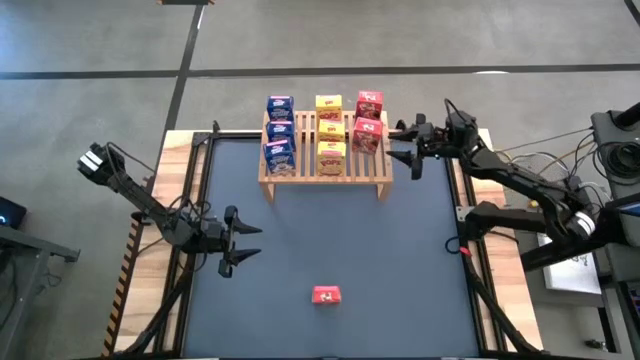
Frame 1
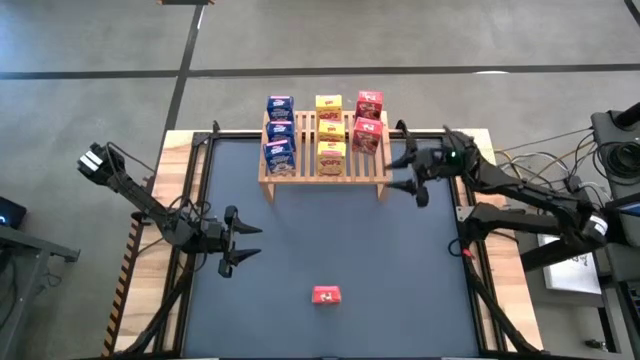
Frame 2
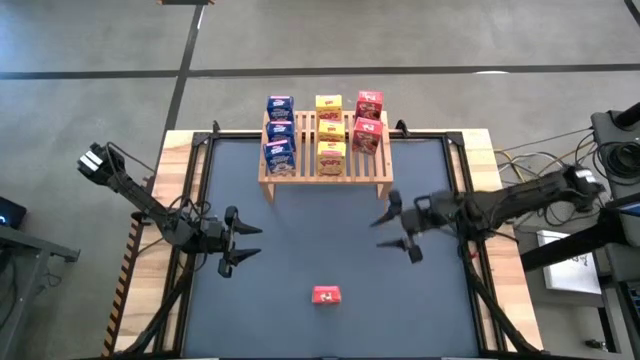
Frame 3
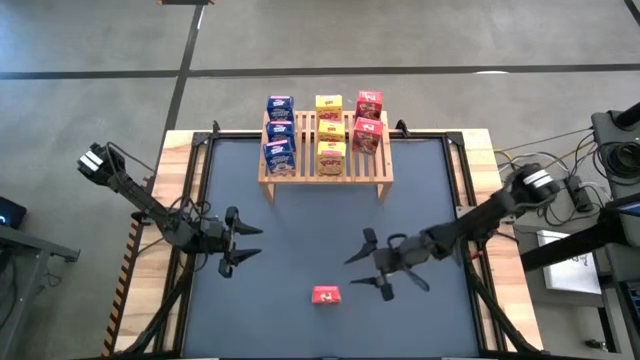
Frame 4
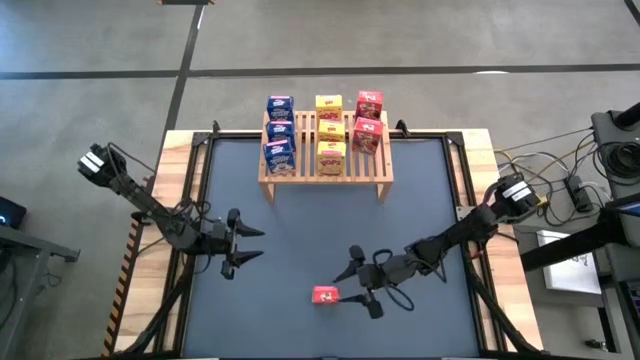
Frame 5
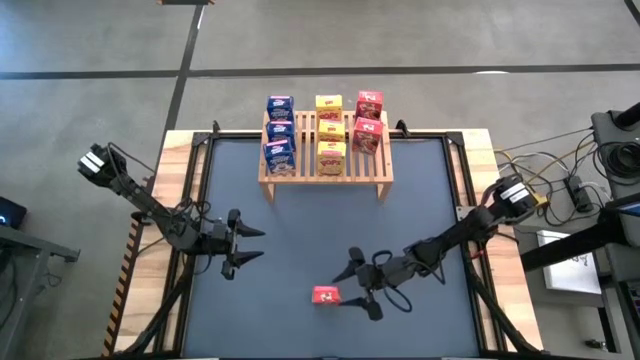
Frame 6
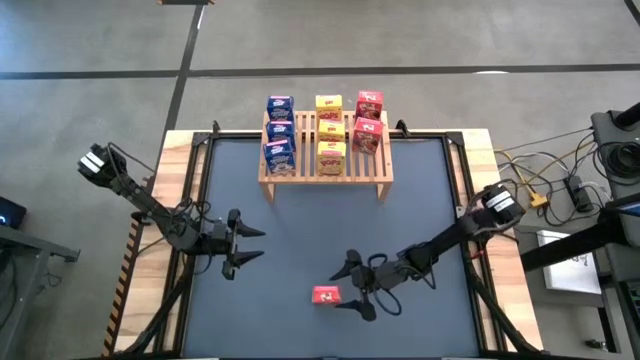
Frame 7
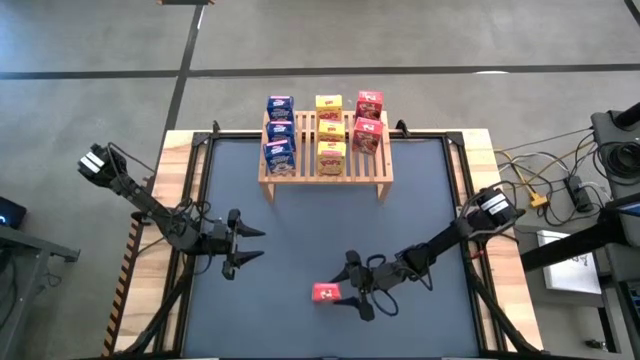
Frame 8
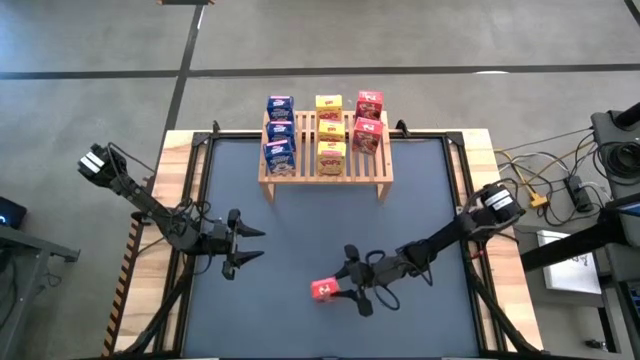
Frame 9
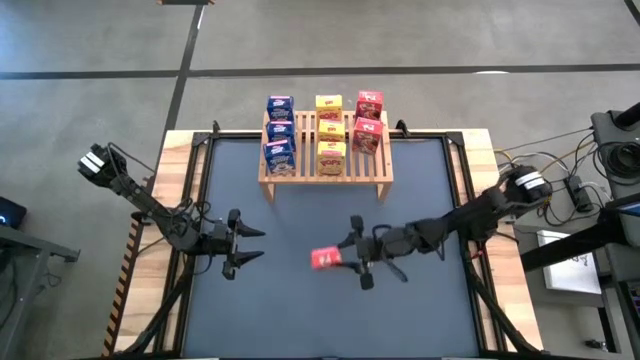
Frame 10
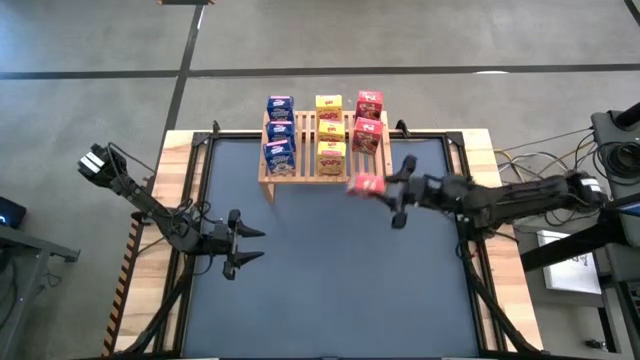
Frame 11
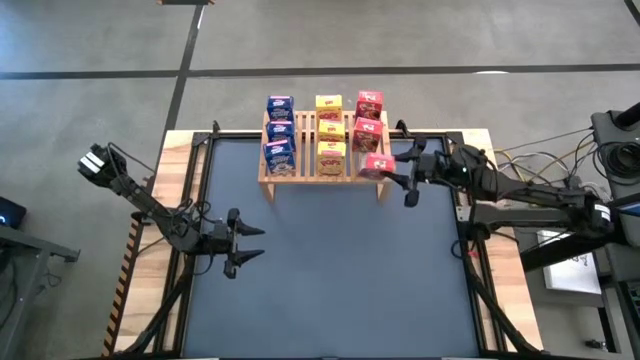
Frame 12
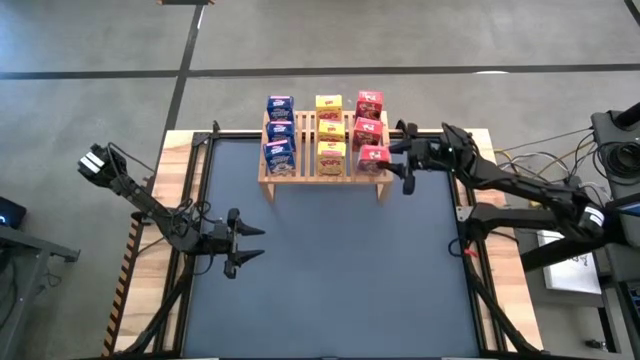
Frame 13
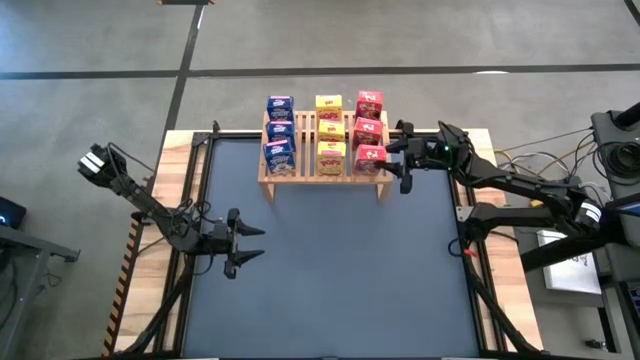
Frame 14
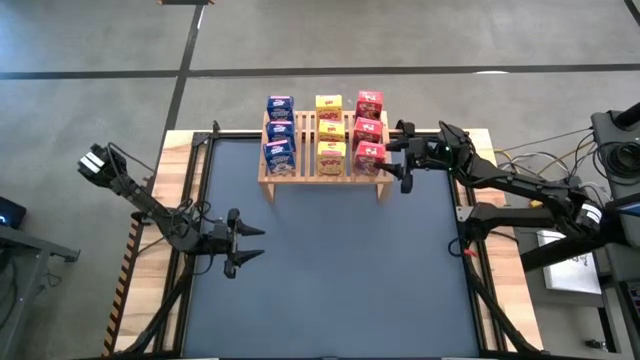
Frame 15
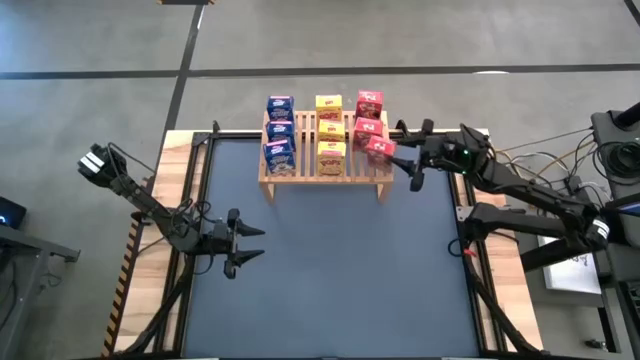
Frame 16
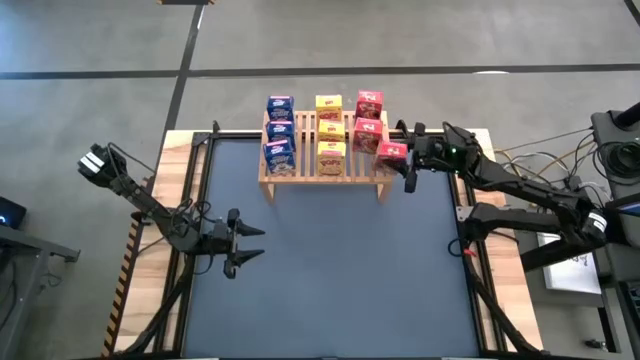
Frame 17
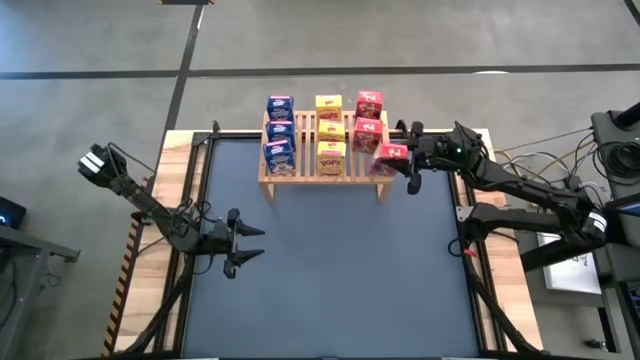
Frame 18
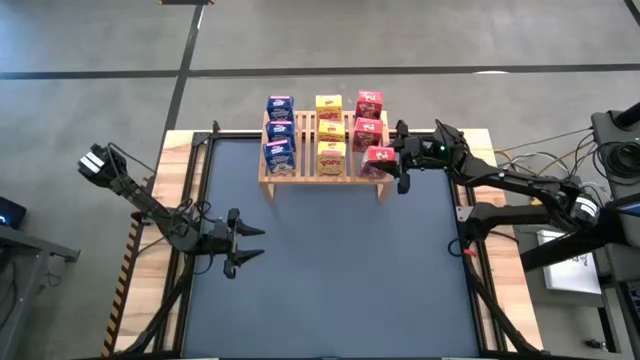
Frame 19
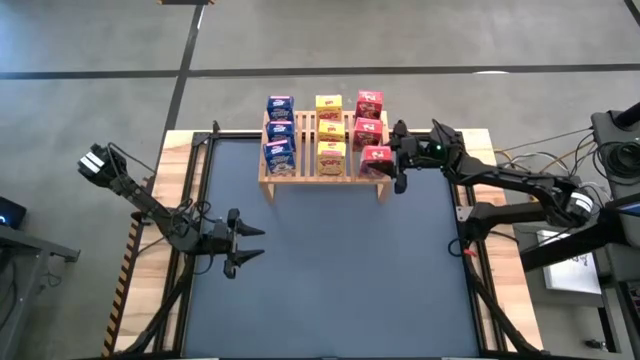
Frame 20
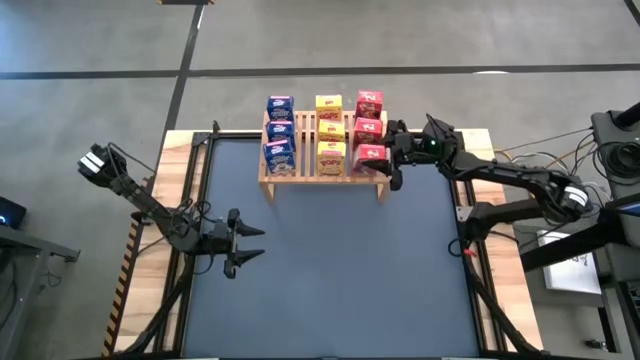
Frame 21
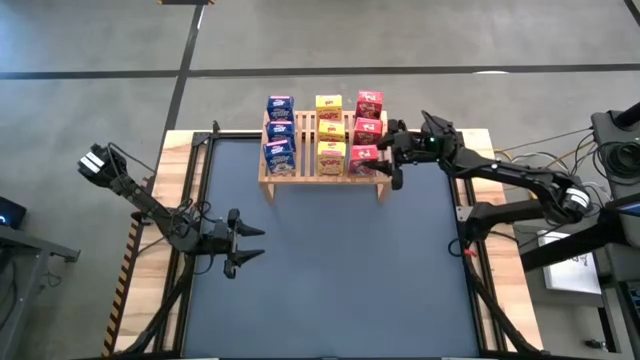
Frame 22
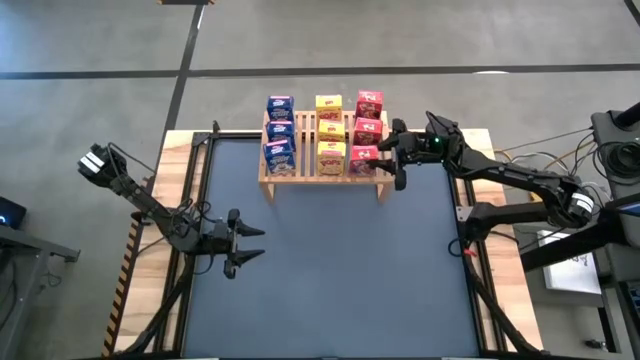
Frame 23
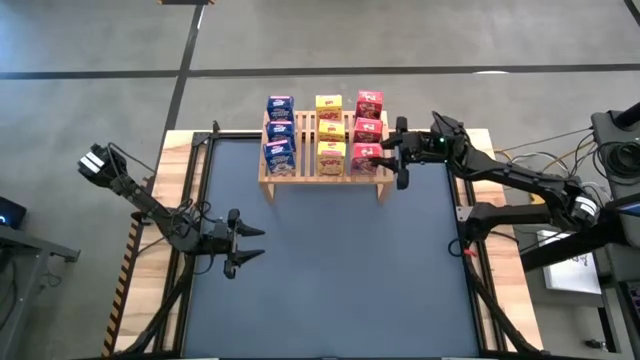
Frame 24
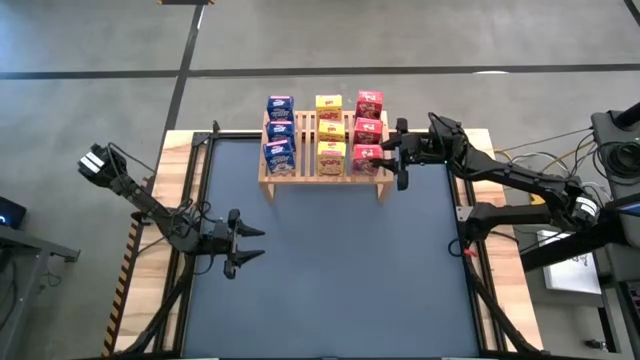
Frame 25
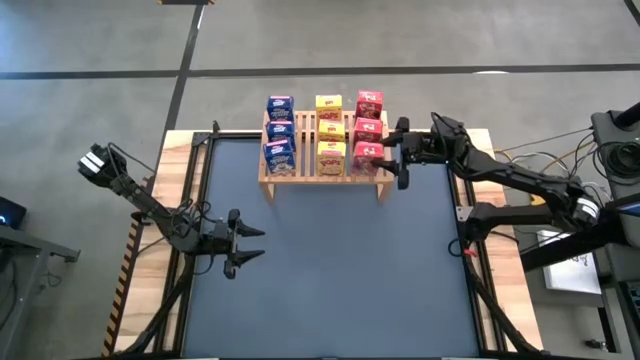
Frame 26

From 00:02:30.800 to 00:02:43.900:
Task: Stack cereal on shelf
Put the red cereal box on the shelf aligned with the red cereal boxes

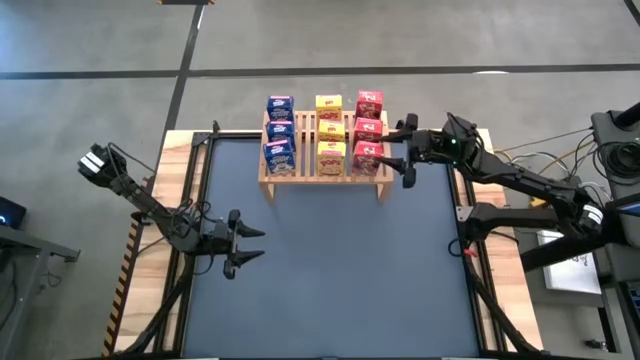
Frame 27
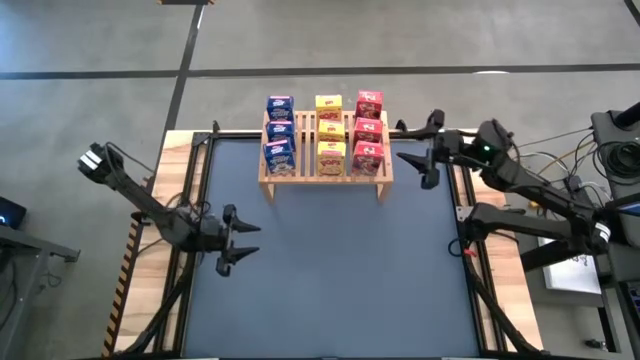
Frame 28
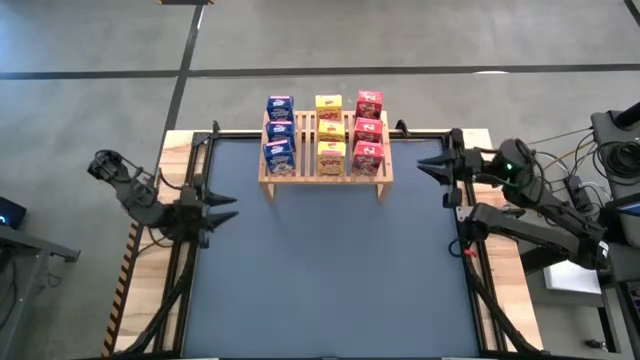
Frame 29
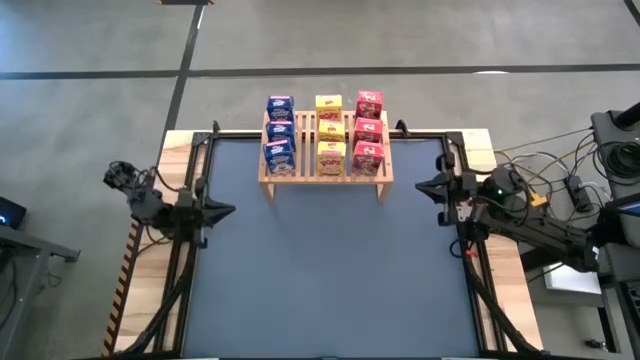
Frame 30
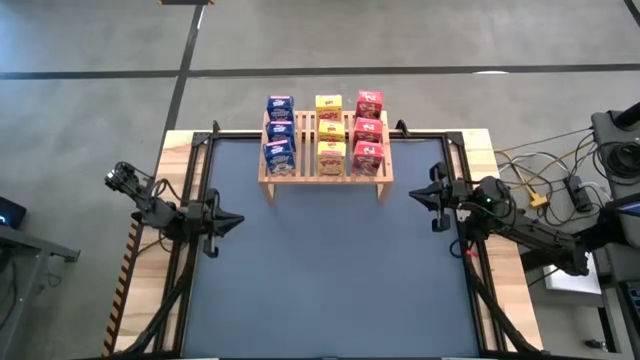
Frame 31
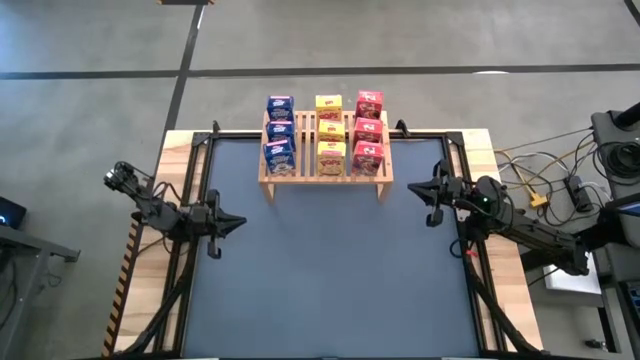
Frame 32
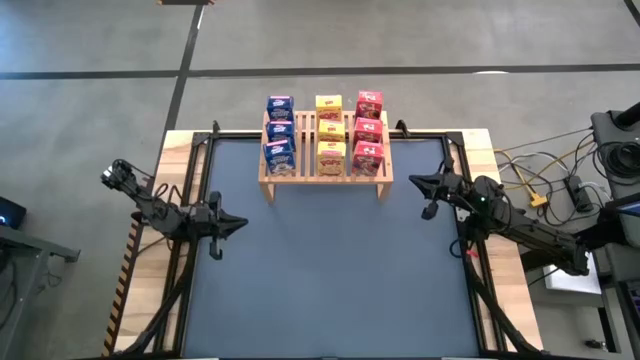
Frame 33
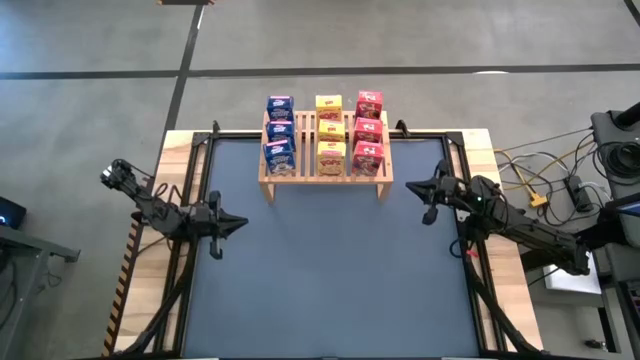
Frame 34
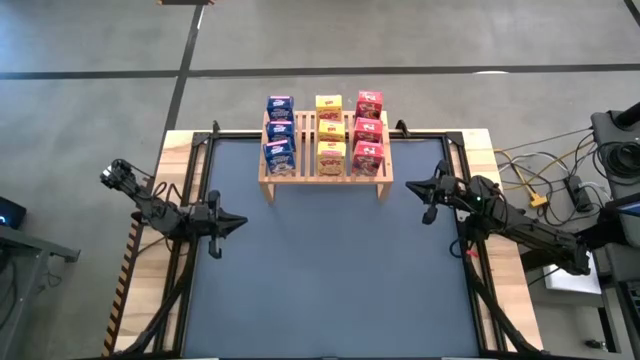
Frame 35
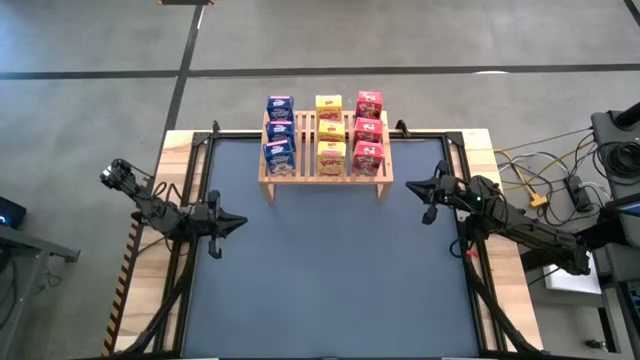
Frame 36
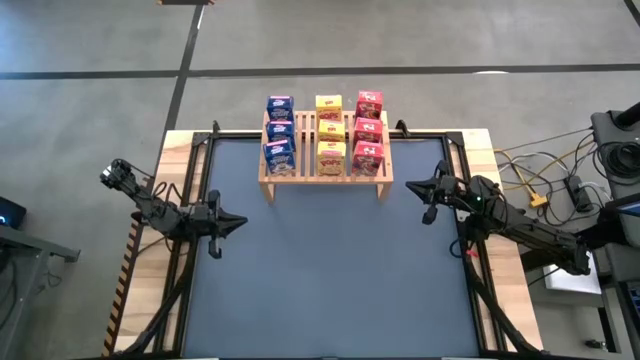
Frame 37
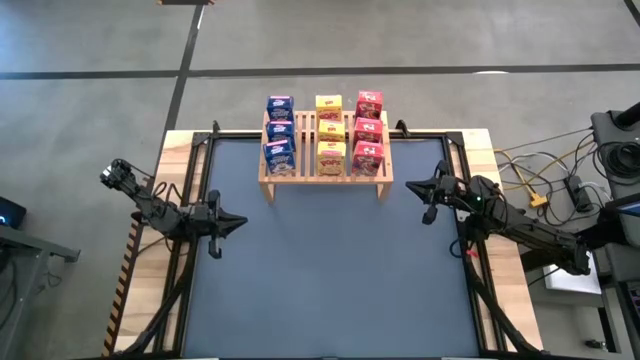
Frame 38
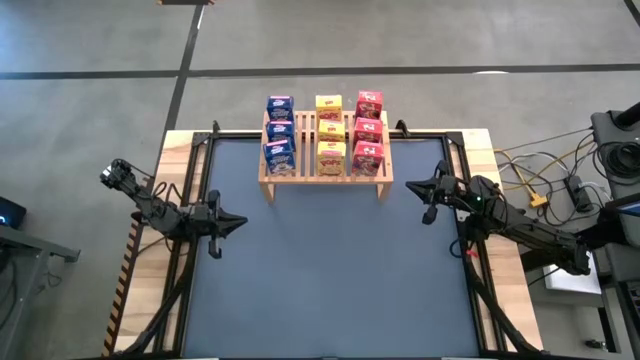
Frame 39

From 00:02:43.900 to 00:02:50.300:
Return to Home Position

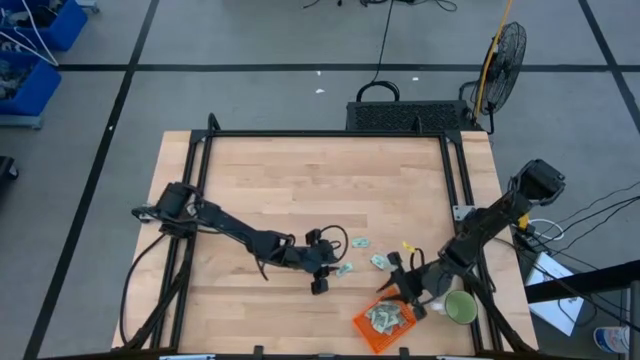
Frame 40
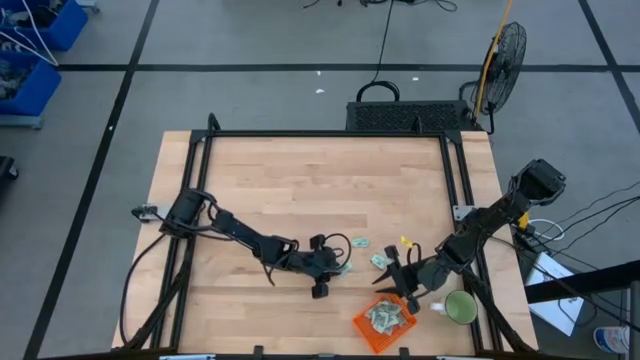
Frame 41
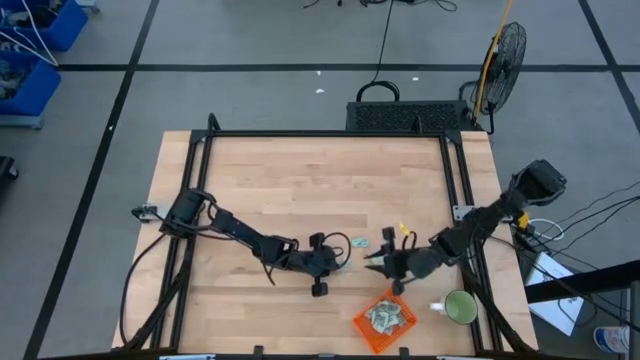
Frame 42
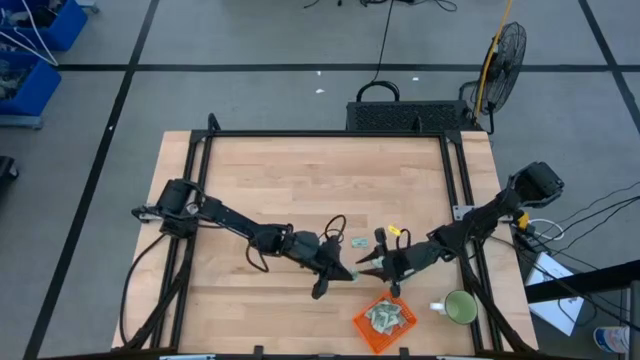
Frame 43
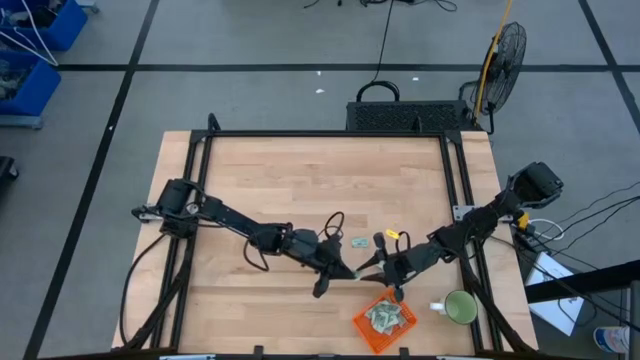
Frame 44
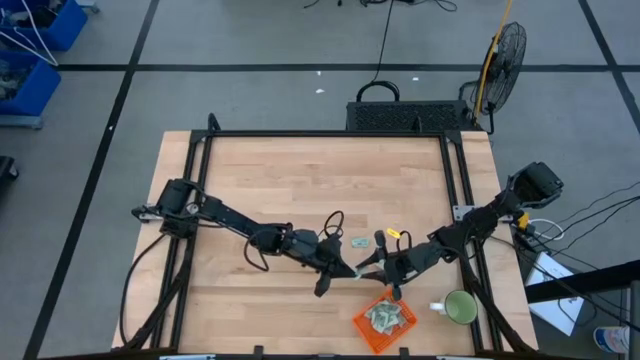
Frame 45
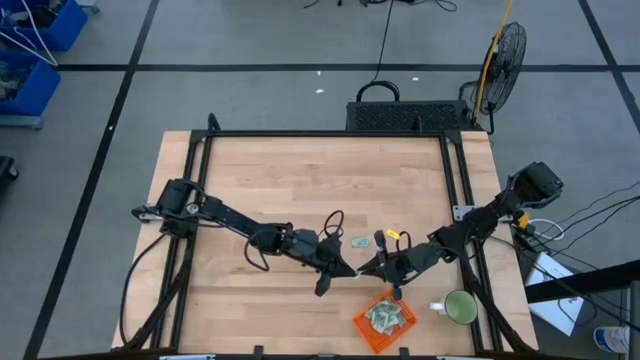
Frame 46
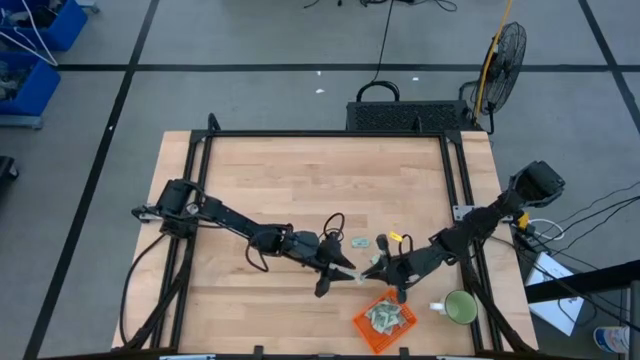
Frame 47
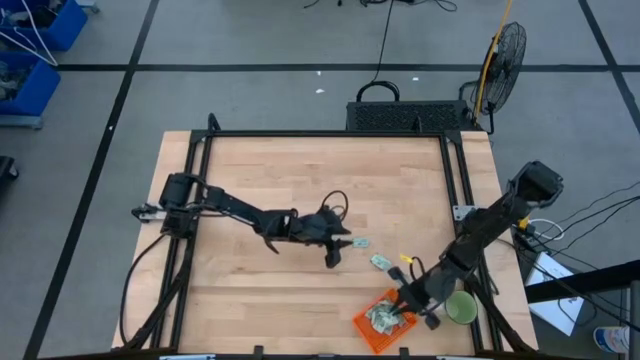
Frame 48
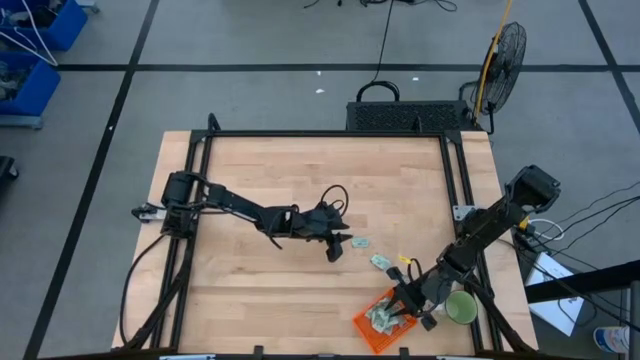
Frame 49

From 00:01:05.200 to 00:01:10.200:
Task: Pick and place Stevia / Truvia into bins
Put the stevia packet into the orange bin
